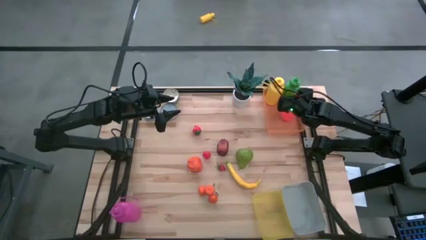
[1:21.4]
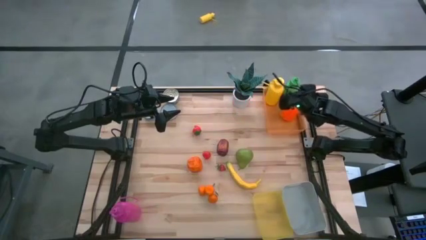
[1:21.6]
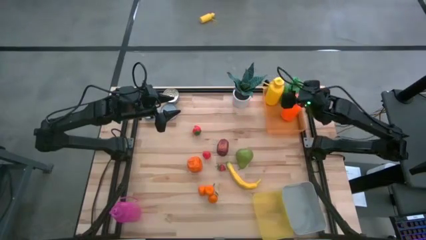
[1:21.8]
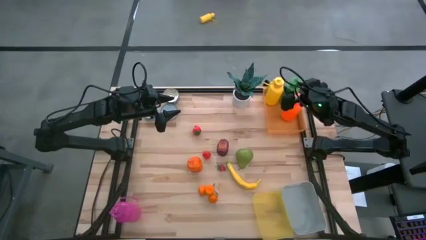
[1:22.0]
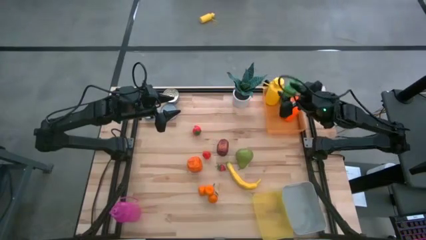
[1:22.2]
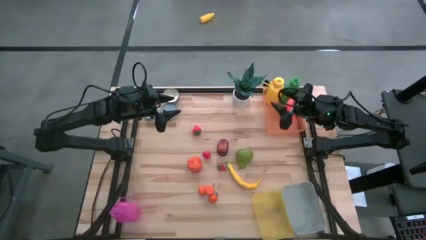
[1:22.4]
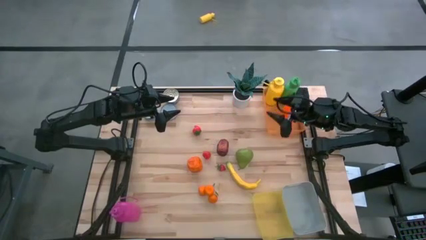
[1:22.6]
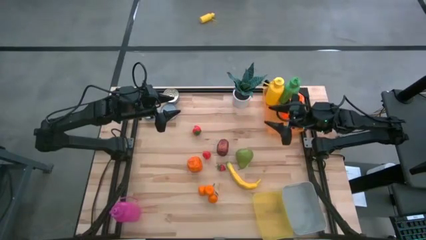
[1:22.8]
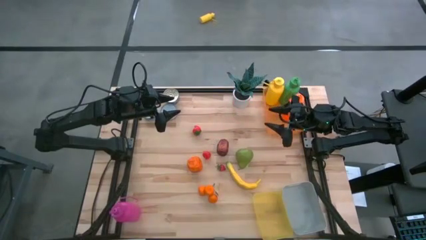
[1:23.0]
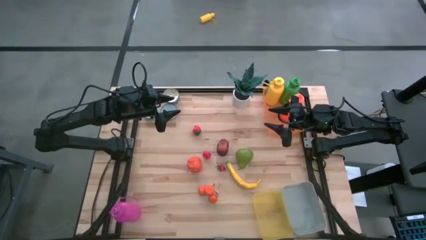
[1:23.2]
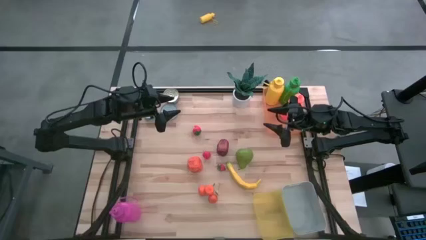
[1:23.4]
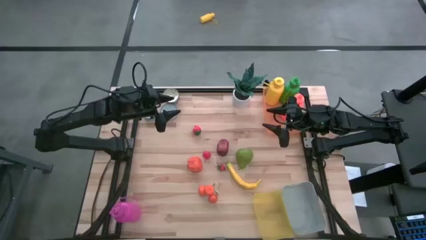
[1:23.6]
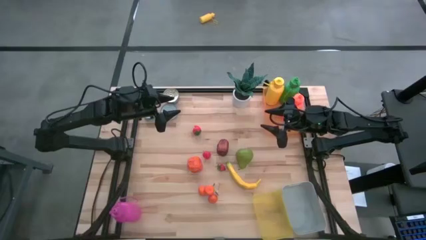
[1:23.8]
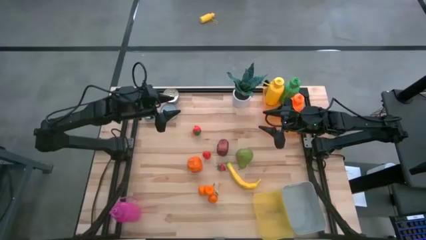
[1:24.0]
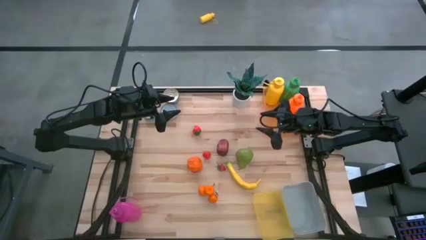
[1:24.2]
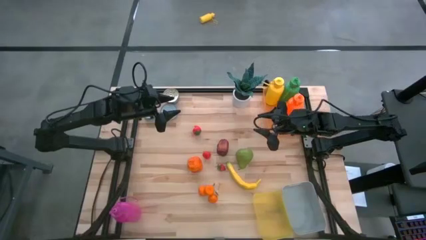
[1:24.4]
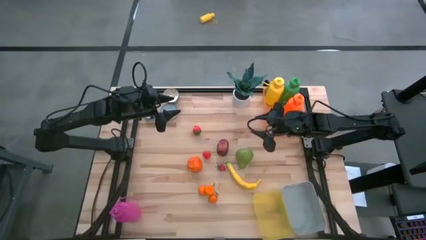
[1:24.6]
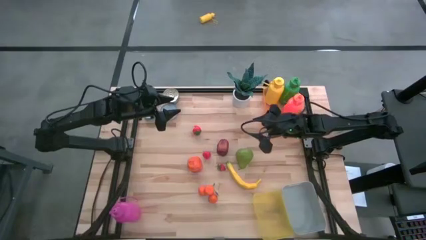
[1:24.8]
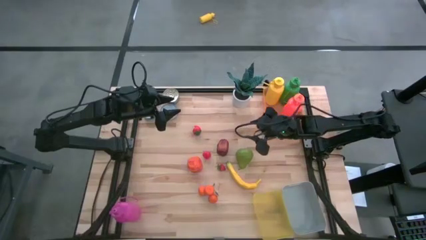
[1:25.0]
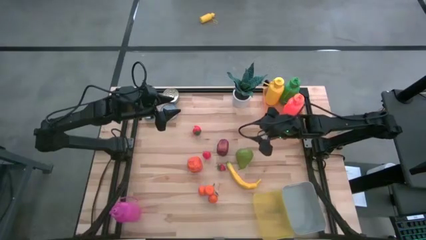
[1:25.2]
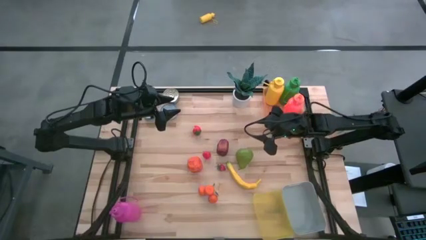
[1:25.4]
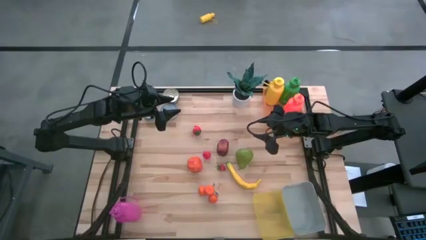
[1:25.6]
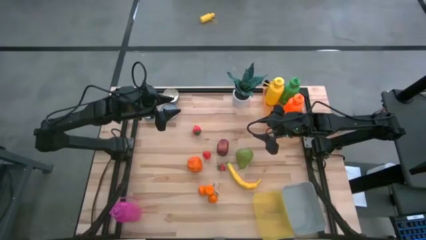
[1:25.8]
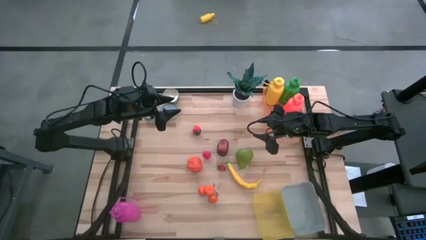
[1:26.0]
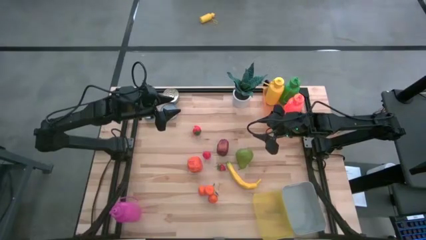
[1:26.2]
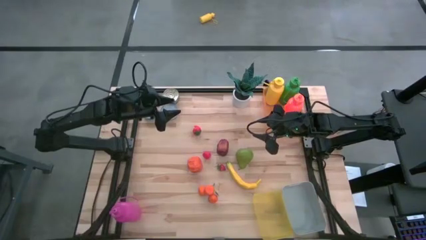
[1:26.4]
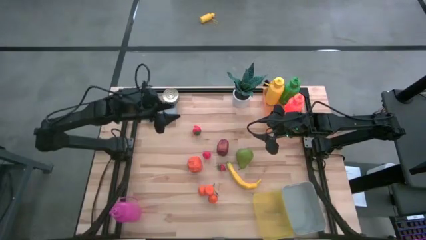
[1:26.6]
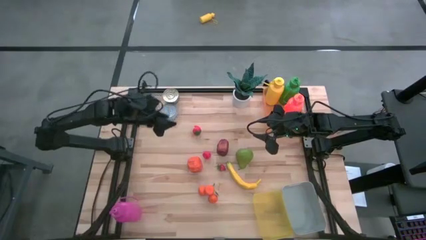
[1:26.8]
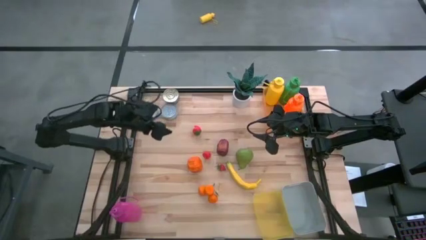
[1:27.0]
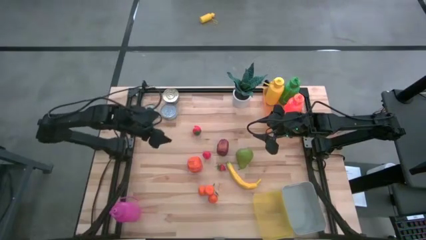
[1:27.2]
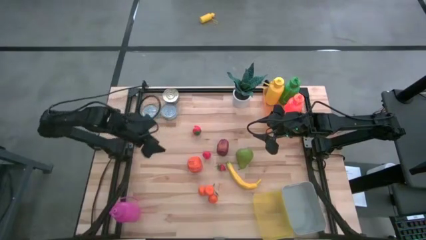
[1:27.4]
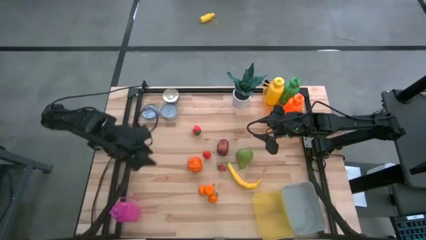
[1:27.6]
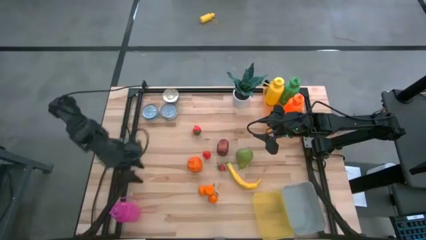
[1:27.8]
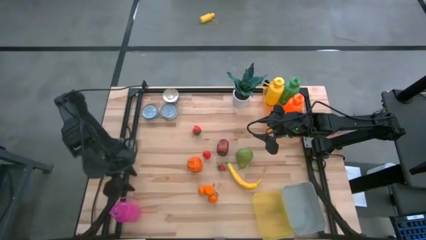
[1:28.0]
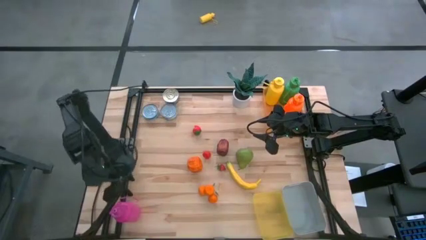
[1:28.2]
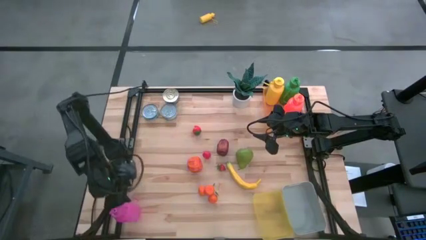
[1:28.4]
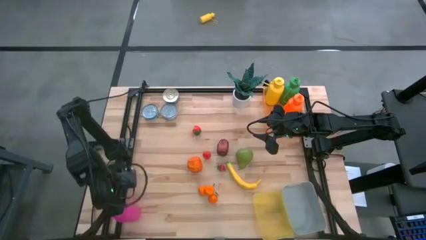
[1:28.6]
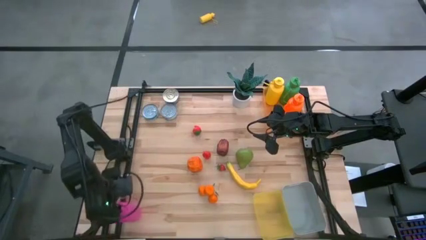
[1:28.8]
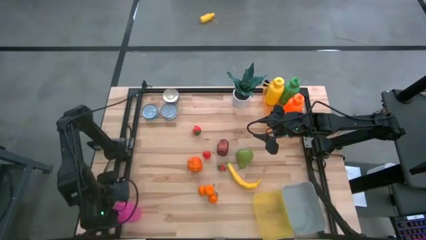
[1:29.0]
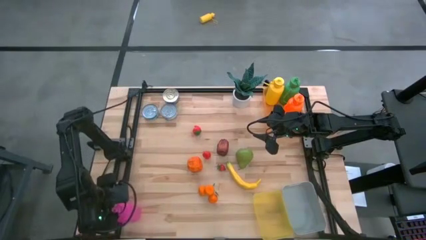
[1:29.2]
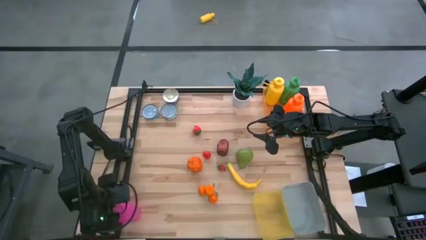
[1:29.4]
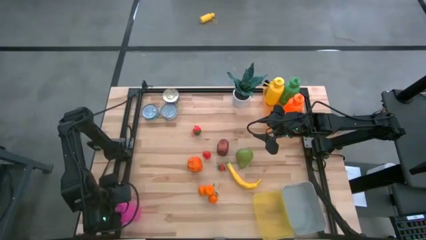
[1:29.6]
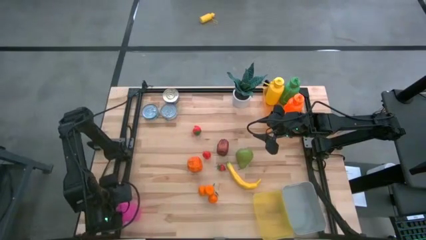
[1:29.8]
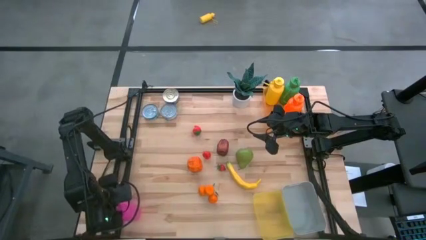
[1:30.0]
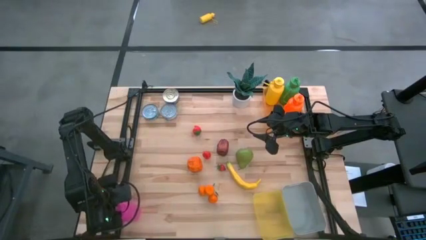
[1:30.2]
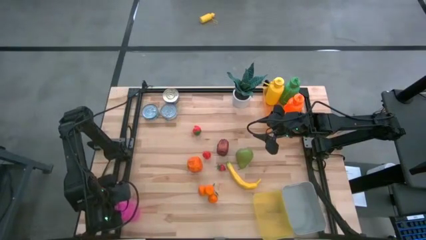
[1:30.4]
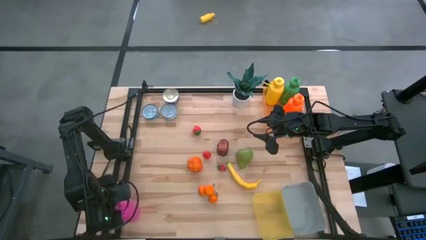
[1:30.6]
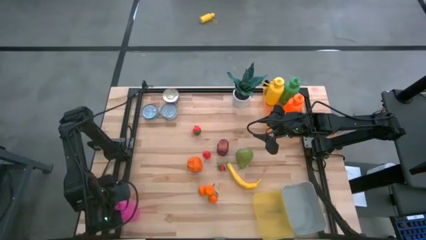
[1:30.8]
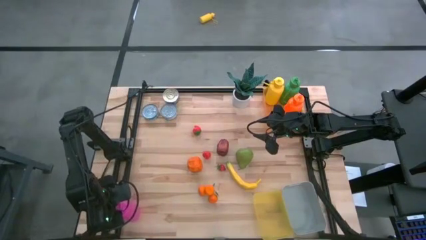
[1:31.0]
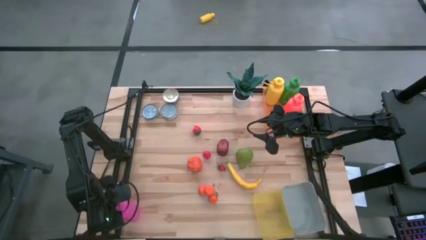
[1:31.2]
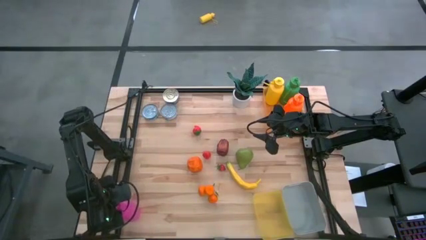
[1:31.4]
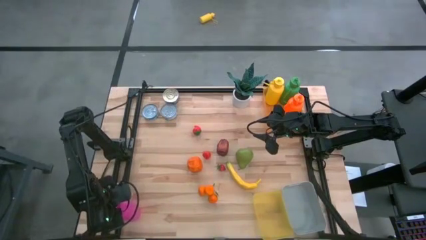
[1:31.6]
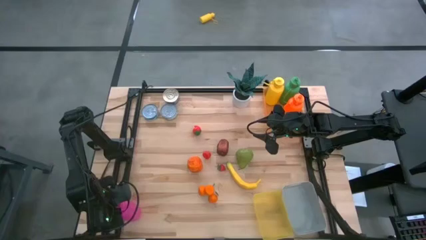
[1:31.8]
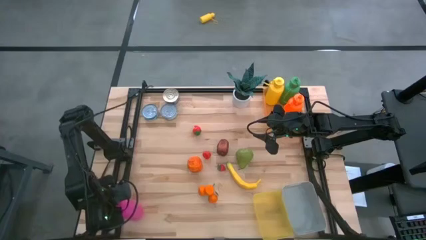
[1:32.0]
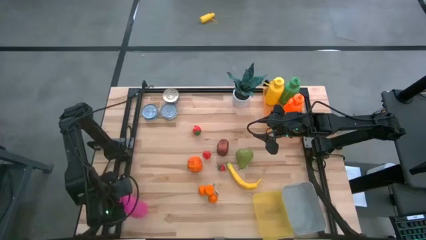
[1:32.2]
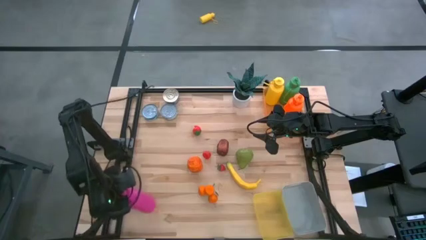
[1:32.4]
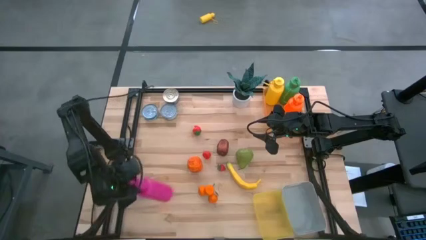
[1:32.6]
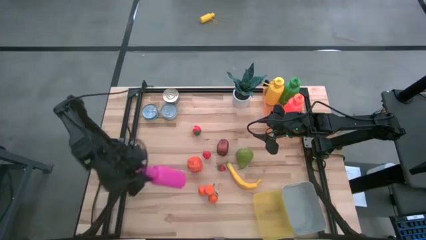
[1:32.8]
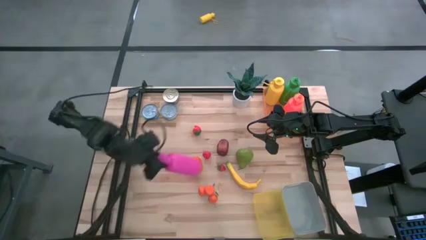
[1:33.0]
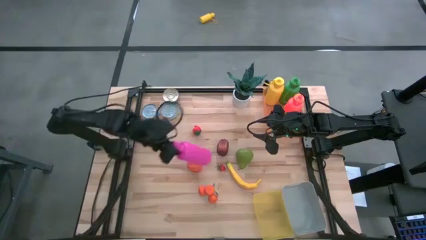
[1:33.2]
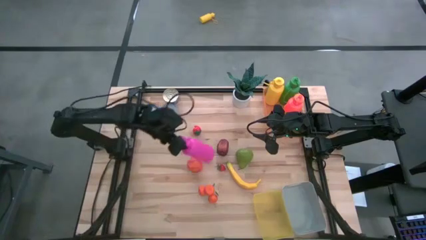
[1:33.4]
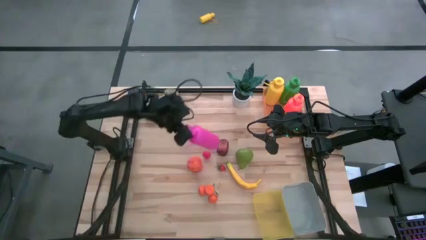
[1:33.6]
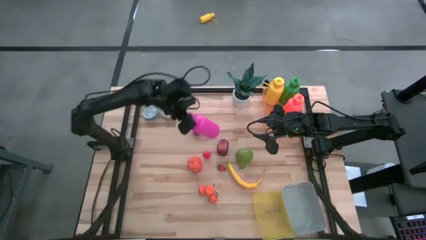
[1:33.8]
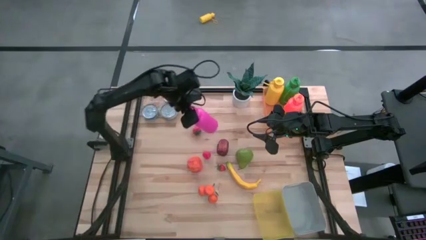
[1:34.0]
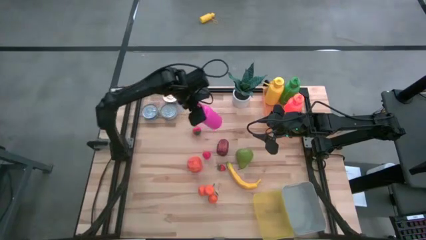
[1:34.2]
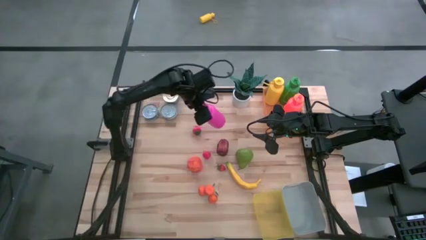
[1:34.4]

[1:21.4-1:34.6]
Task: Pick & Place Food Item
Put the violet water bottle into the orange bin
